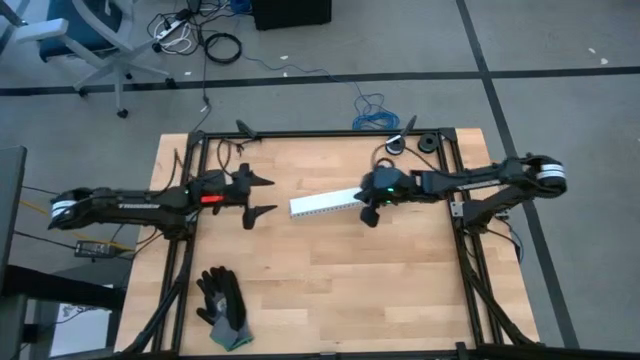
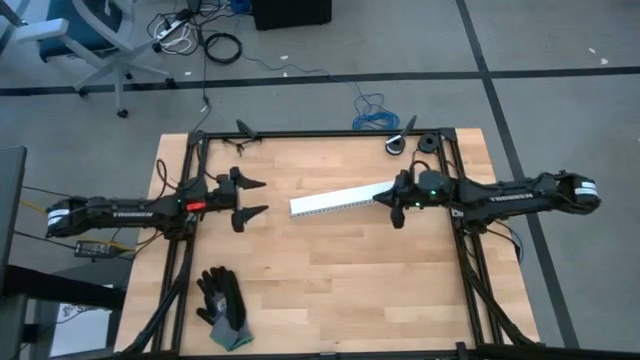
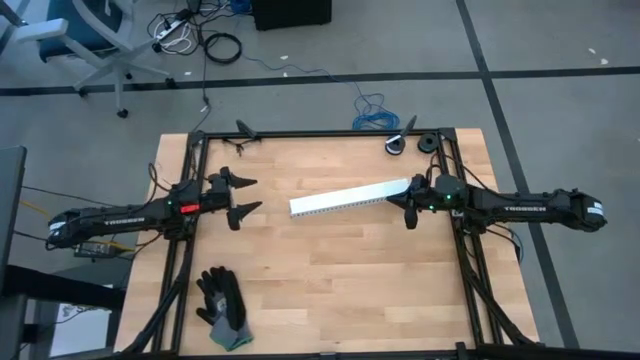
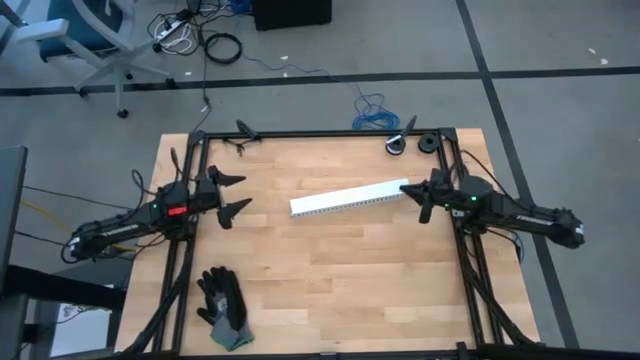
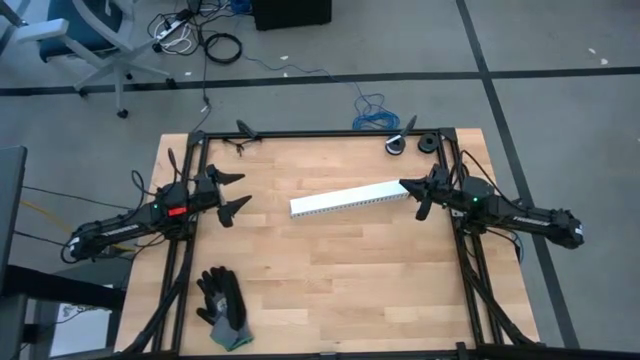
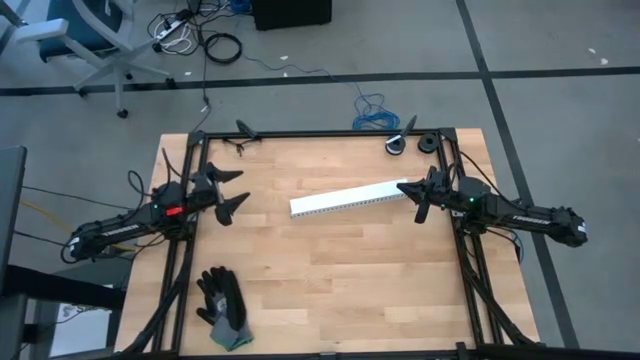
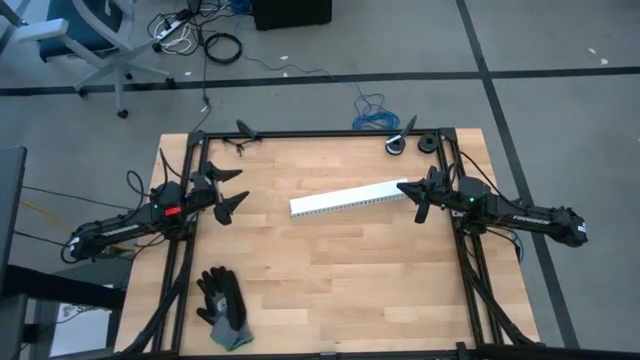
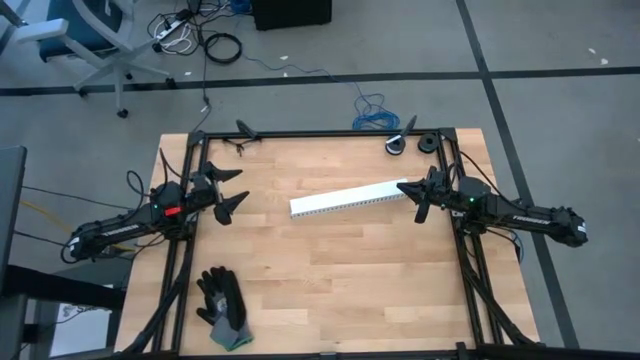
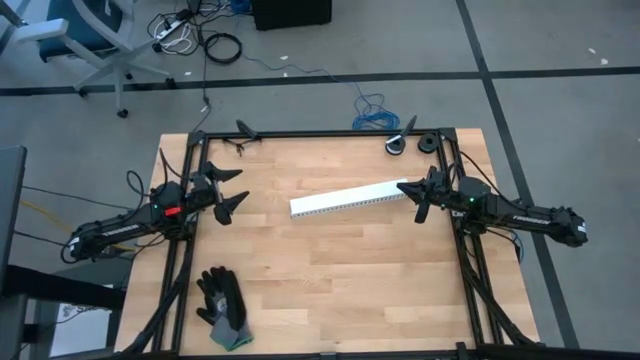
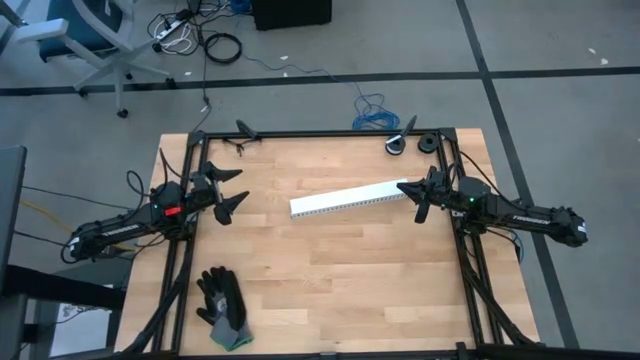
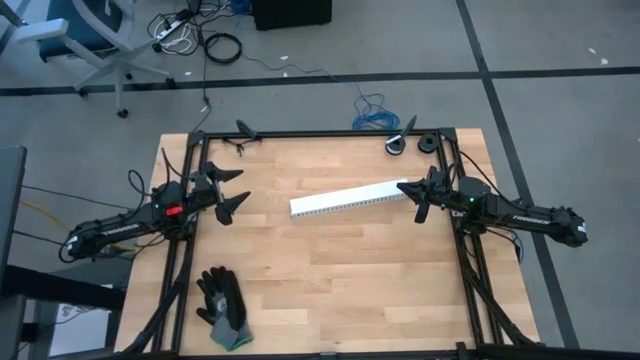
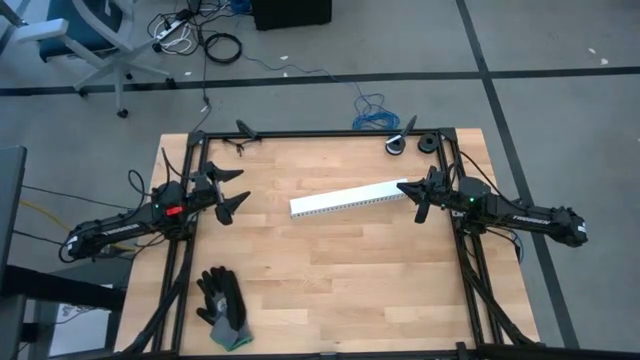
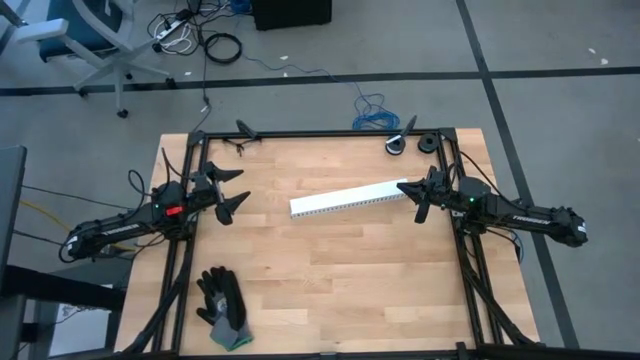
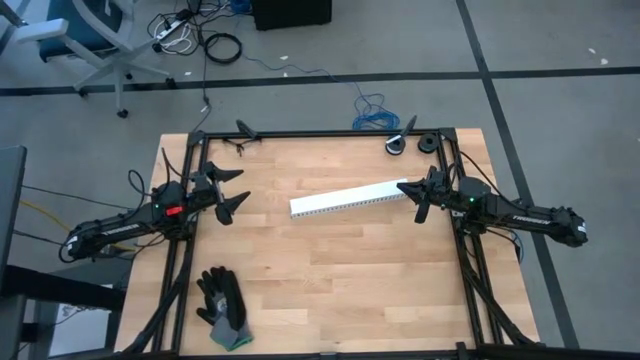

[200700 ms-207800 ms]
Task: Ziptie cables
Return to Home Position

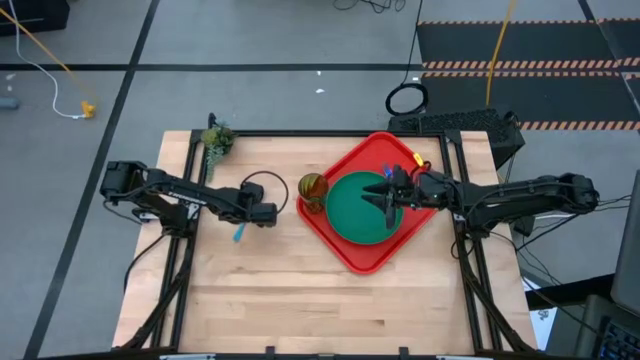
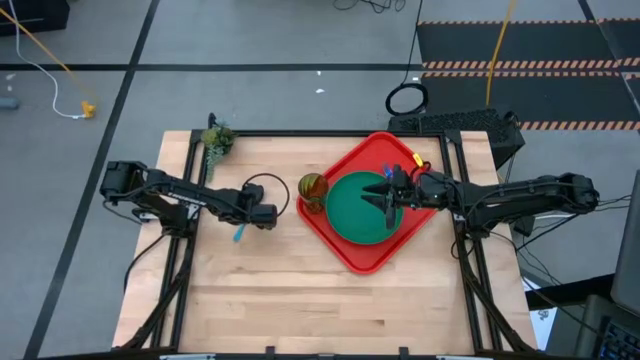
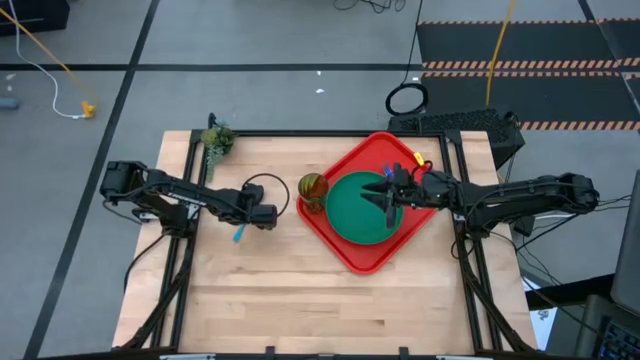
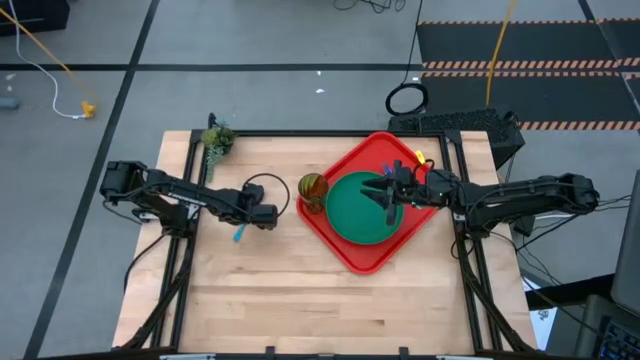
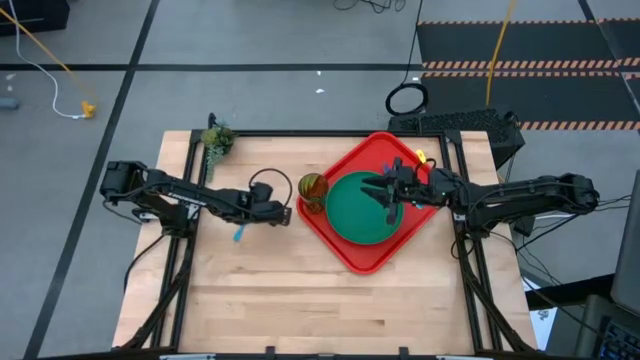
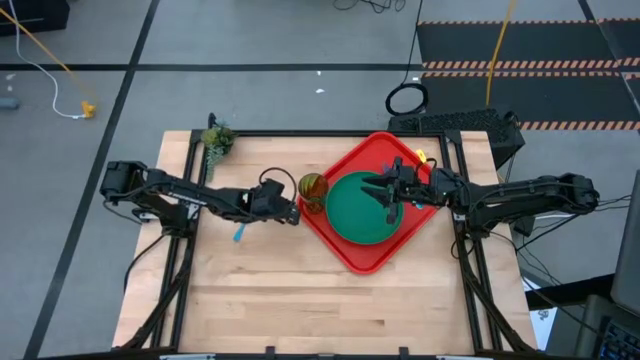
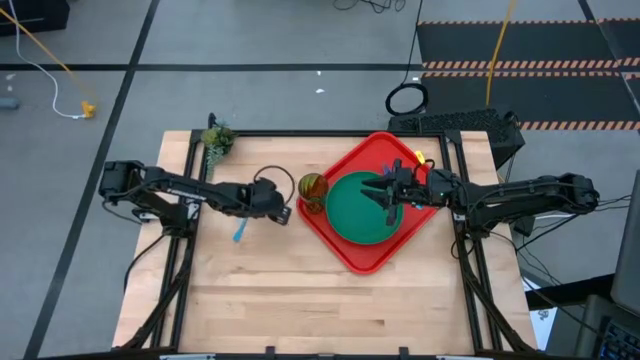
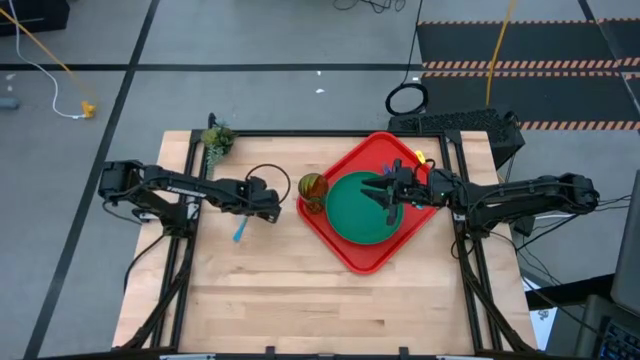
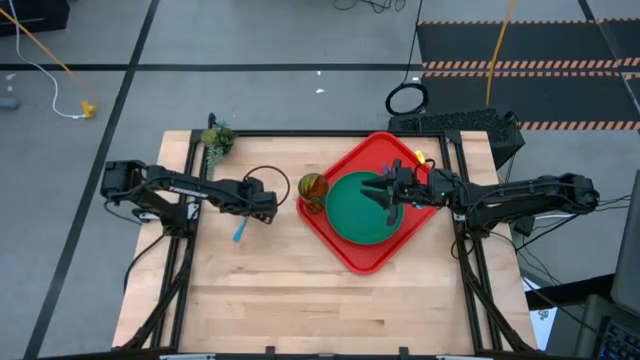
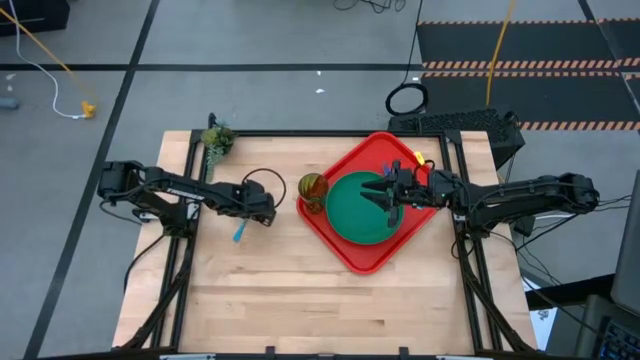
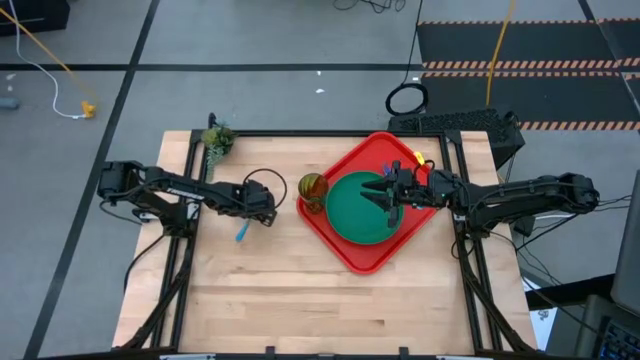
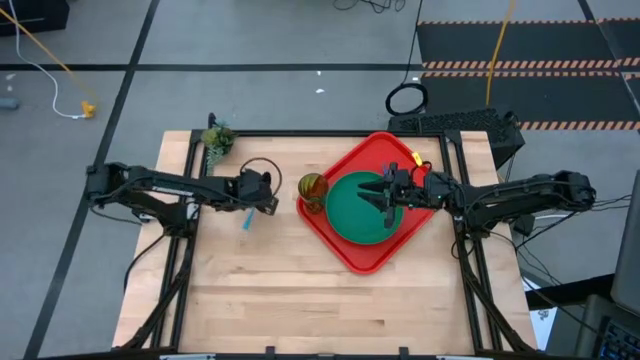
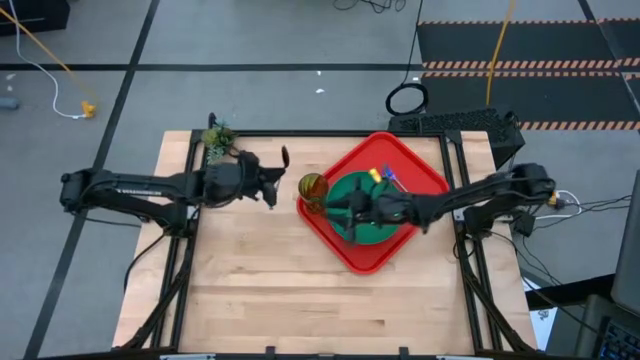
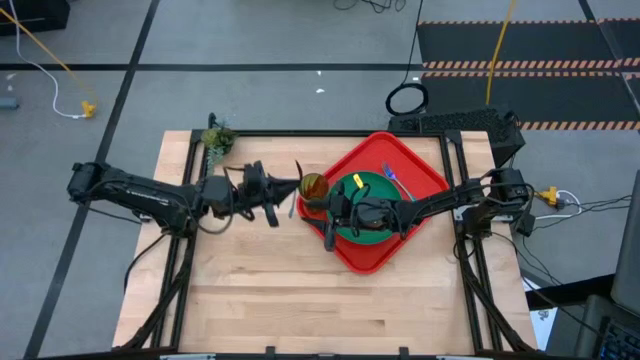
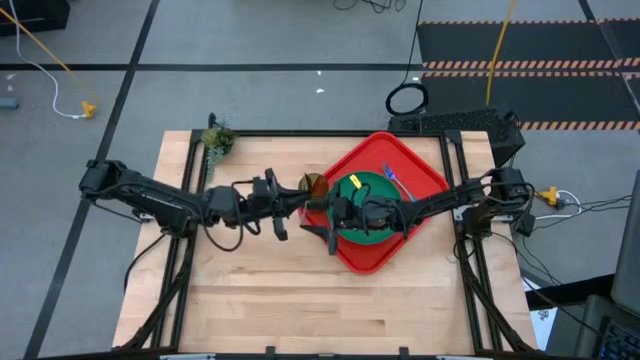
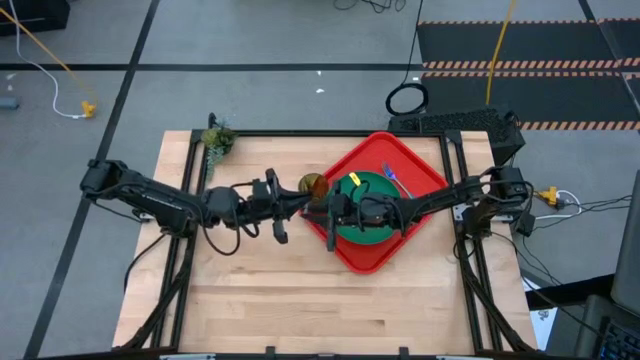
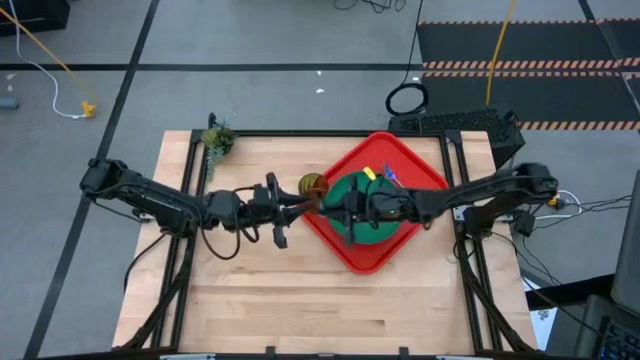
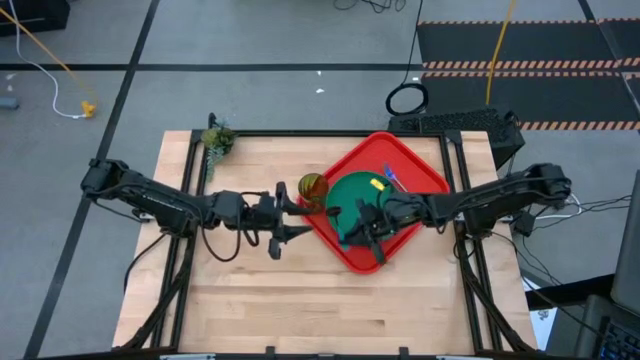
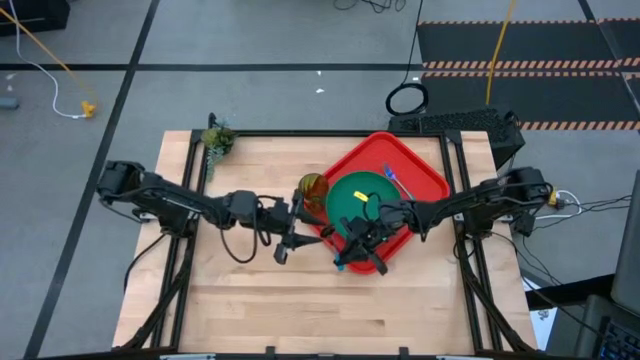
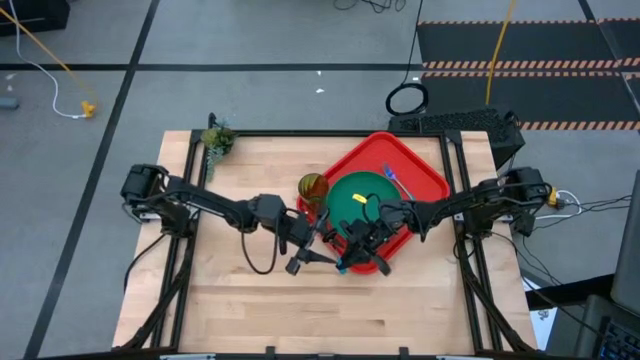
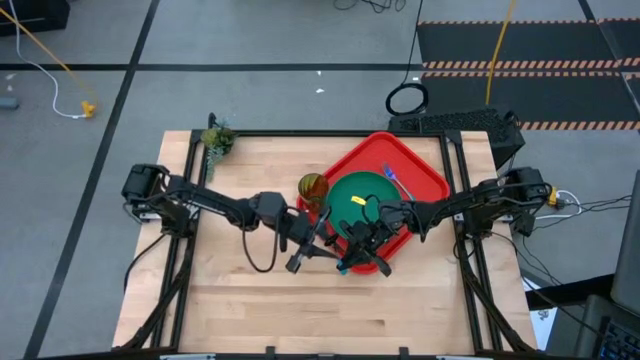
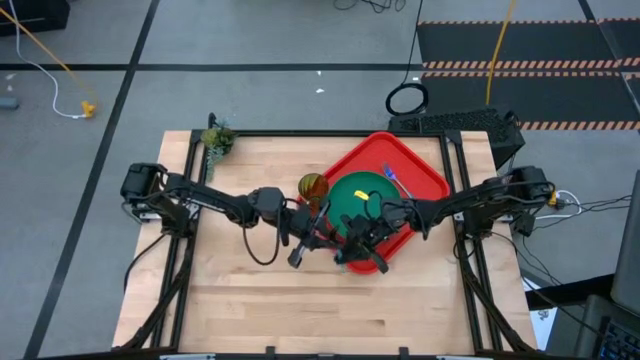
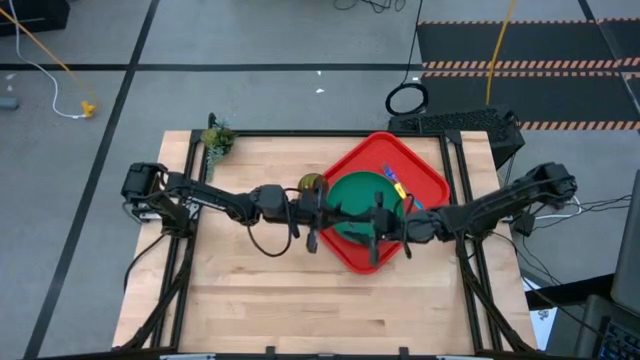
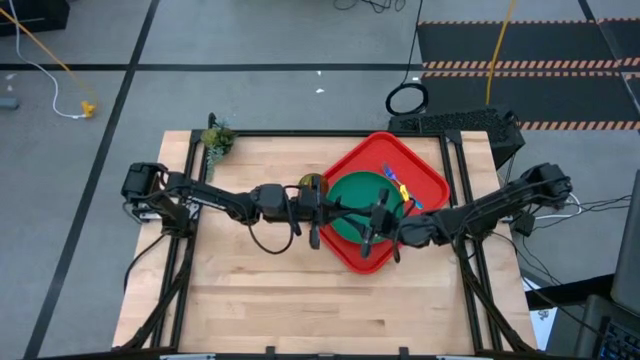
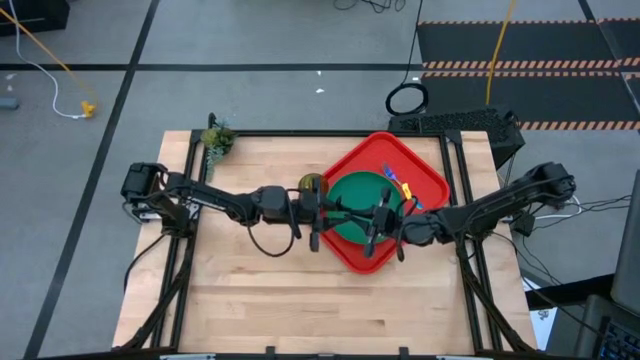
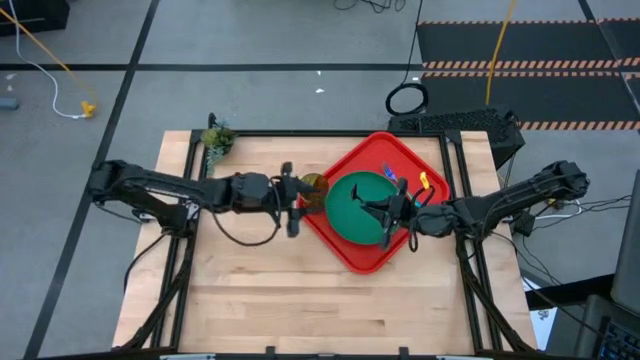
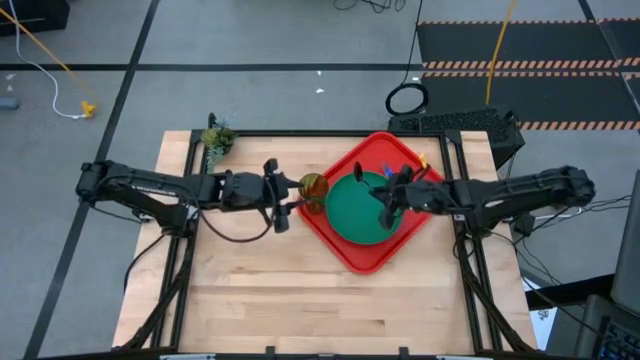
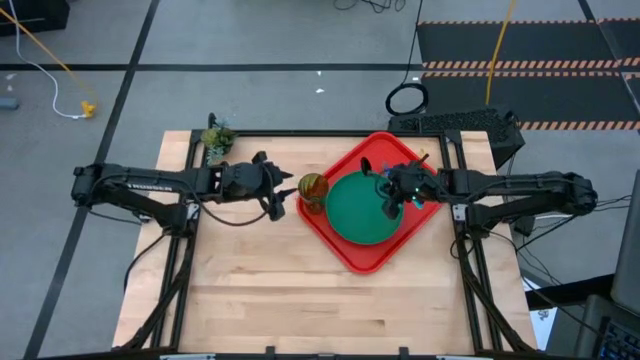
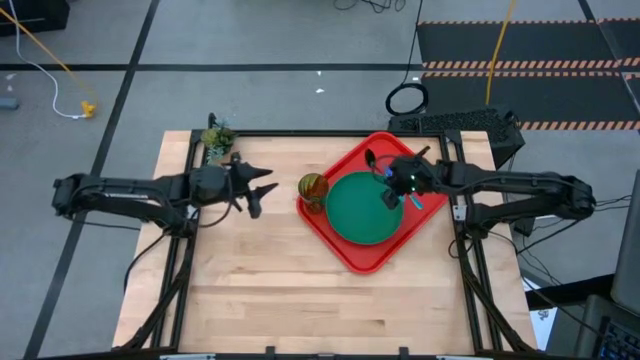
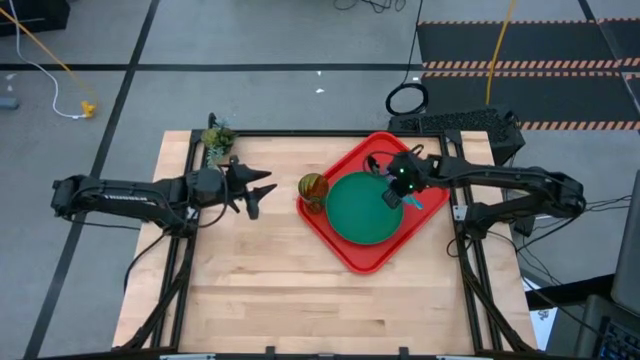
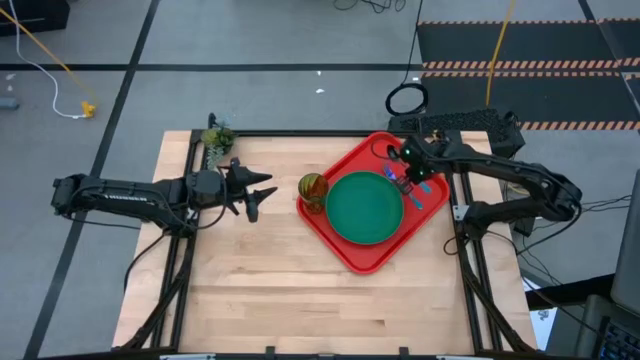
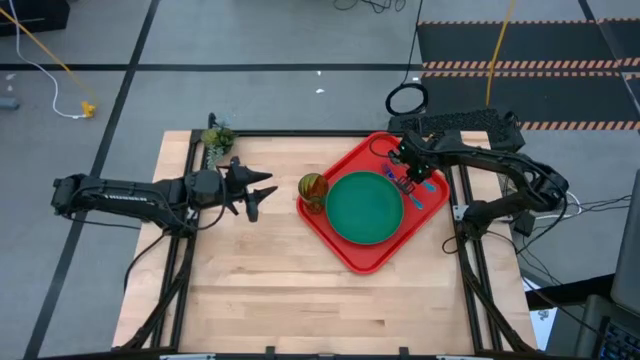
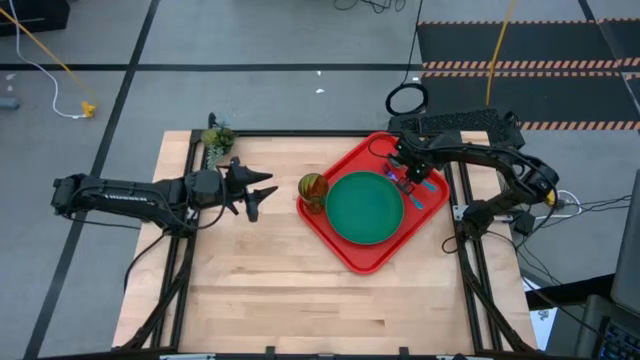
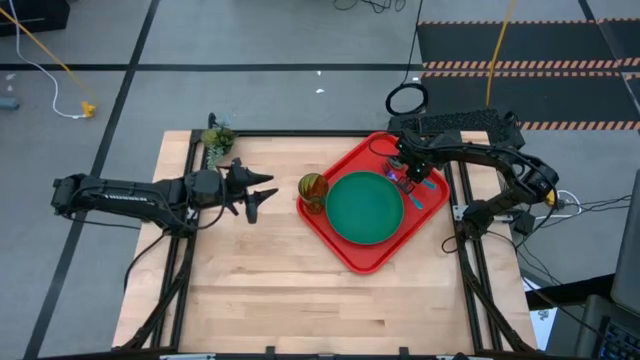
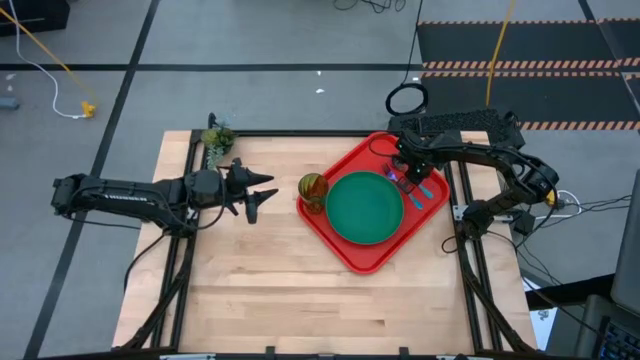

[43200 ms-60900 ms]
Task: Pick and place plate/cup/fork/spoon on tray
Put the blue spoon on the red serving tray
